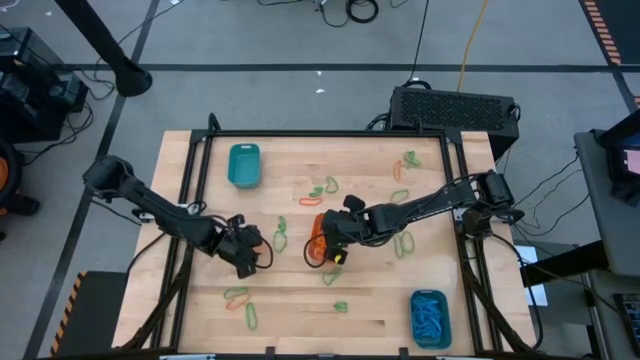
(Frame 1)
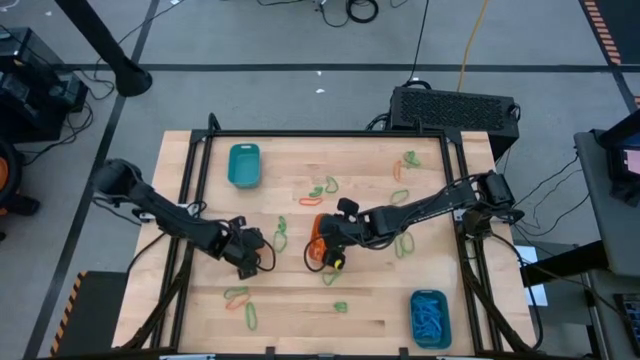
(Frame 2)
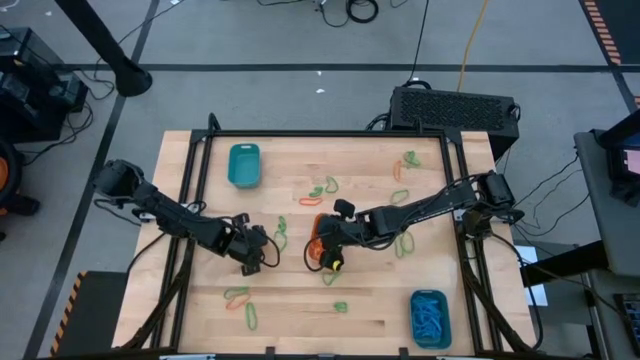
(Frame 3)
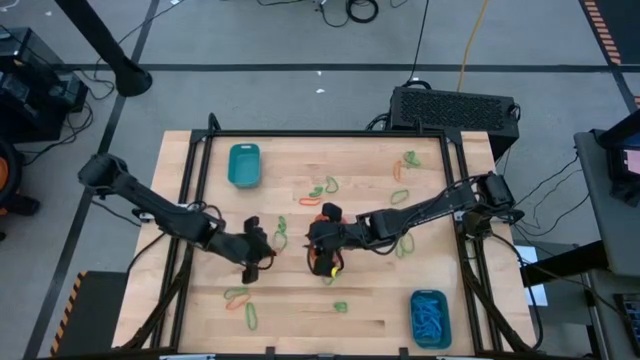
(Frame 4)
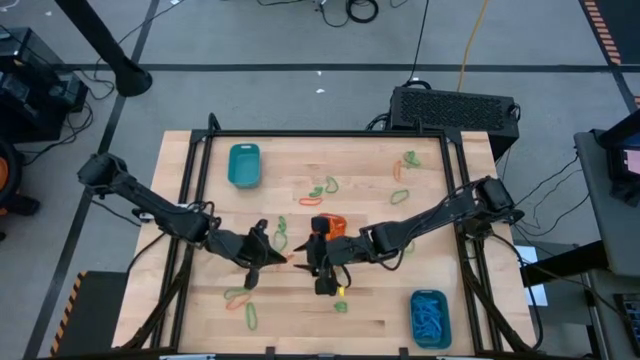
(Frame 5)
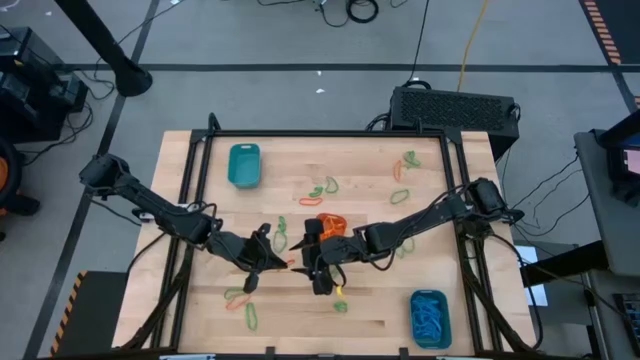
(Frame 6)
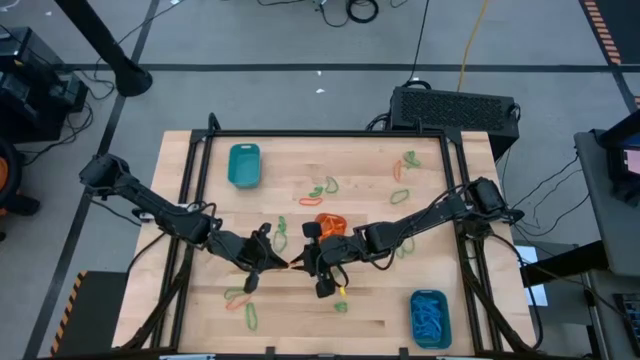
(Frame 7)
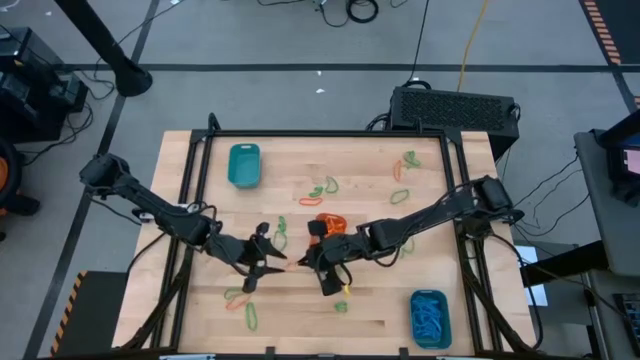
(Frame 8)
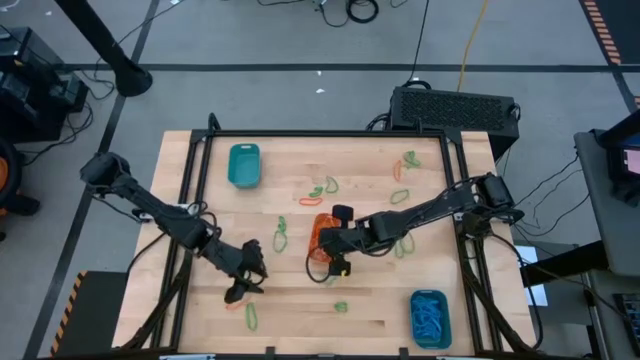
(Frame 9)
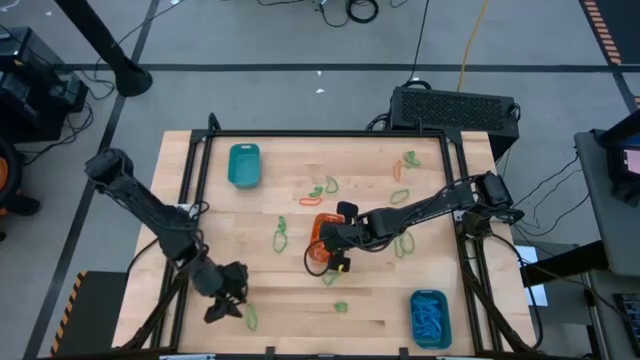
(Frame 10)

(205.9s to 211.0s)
Task: Sort rubber bands into baskets
Put the orange rubber band into the orange bin

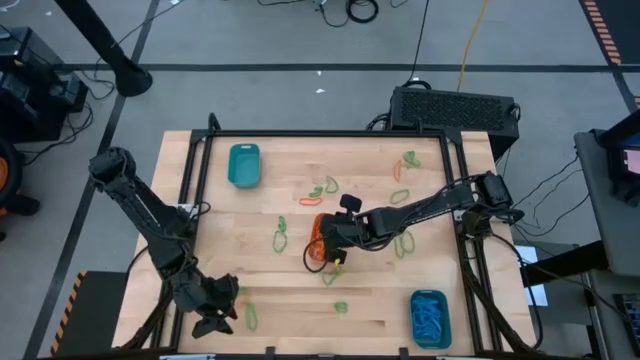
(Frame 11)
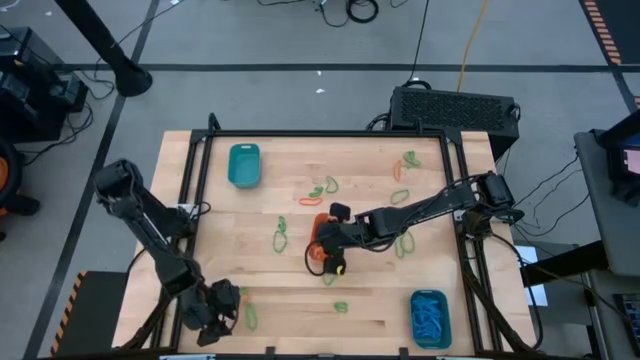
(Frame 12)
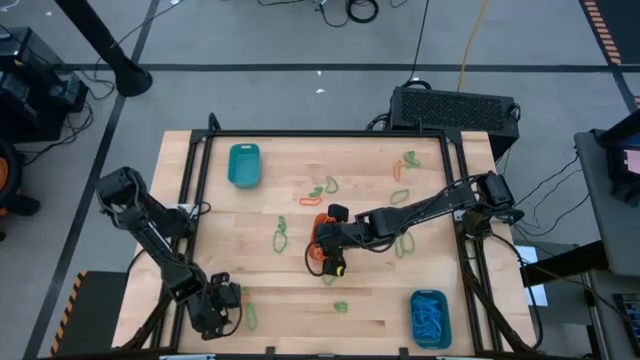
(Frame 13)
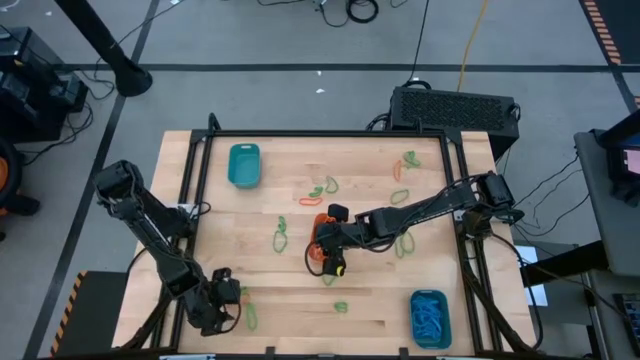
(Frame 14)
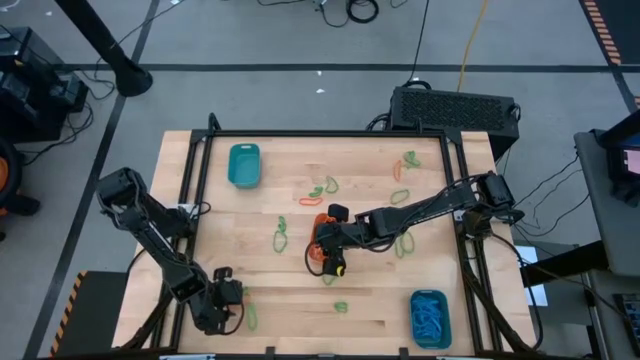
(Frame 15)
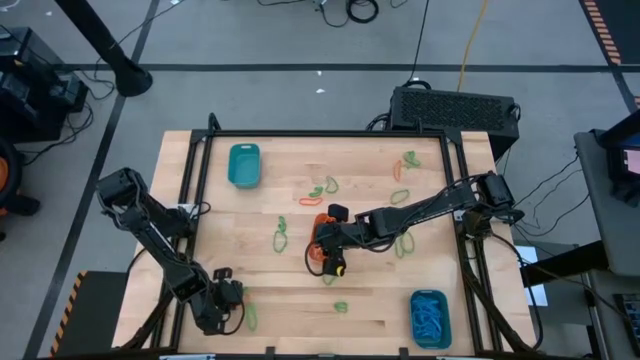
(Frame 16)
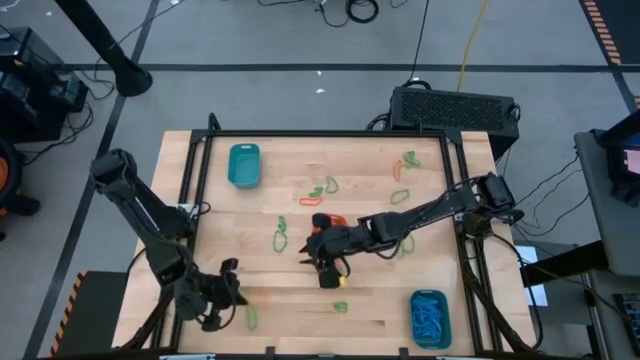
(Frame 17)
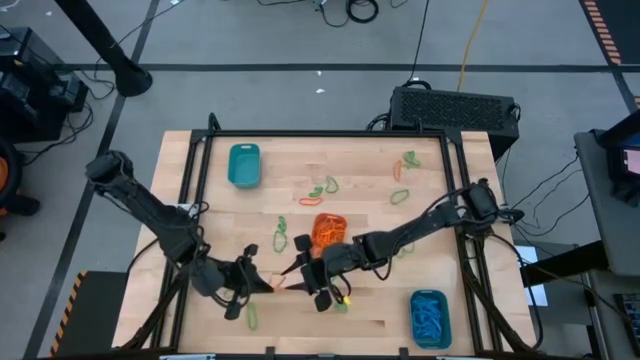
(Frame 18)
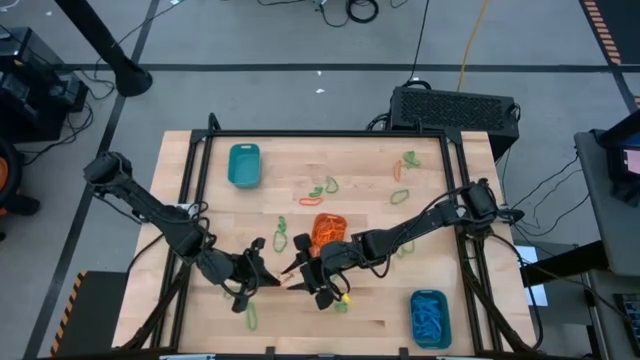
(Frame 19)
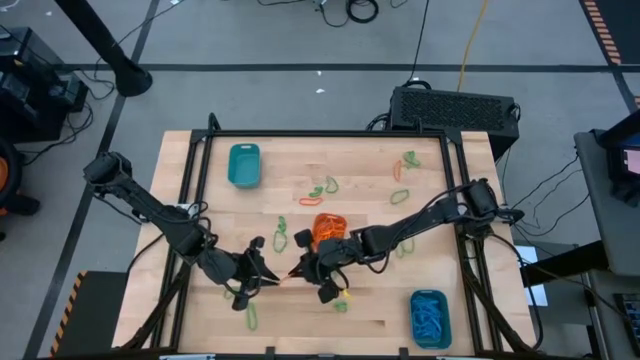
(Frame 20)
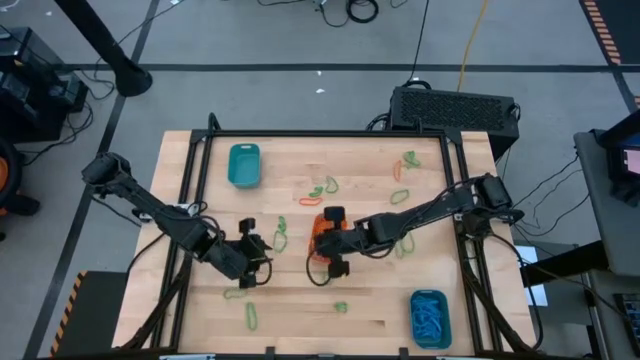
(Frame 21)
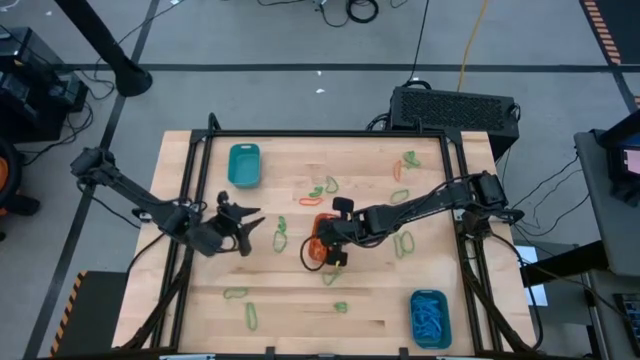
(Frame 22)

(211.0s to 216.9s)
Put the orange rubber band into the orange bin

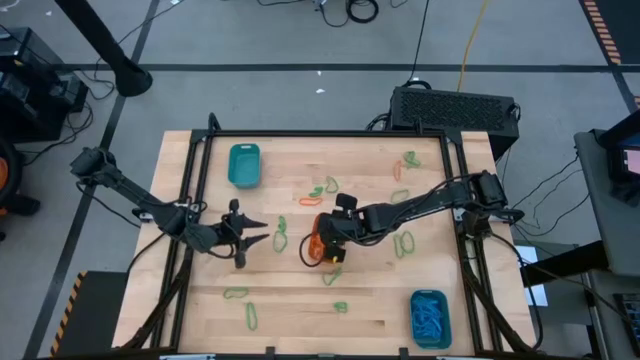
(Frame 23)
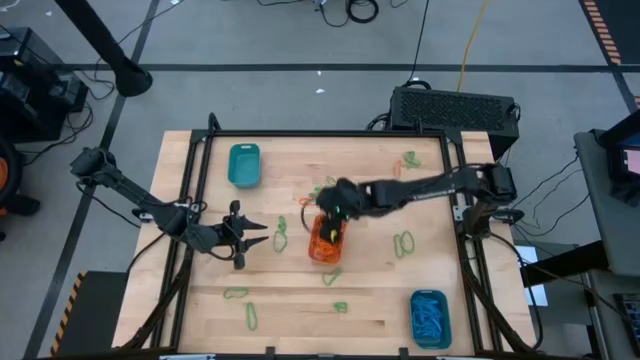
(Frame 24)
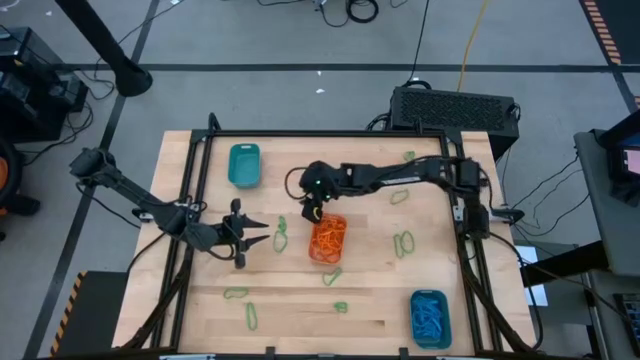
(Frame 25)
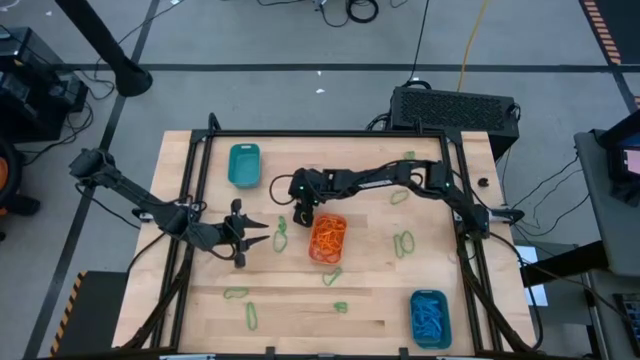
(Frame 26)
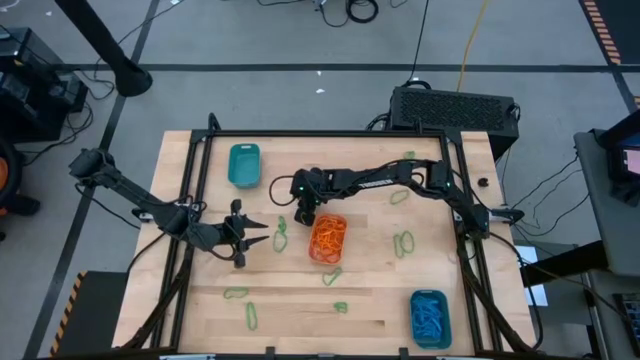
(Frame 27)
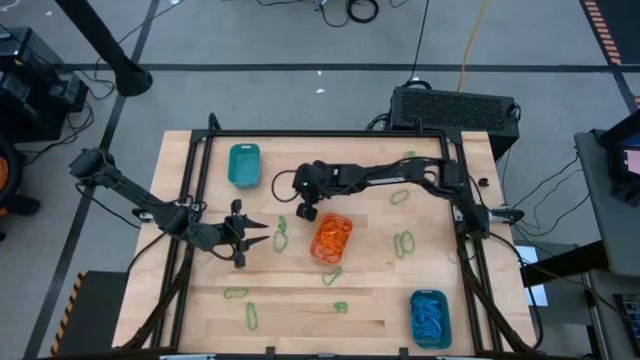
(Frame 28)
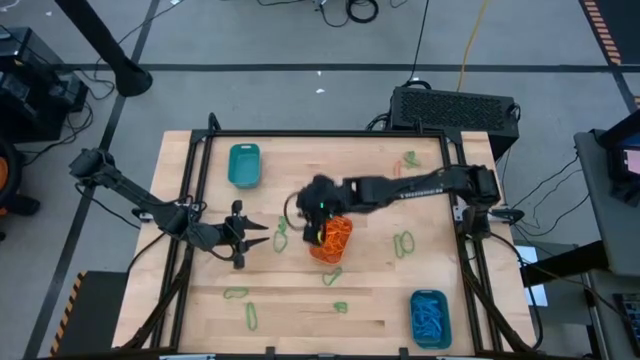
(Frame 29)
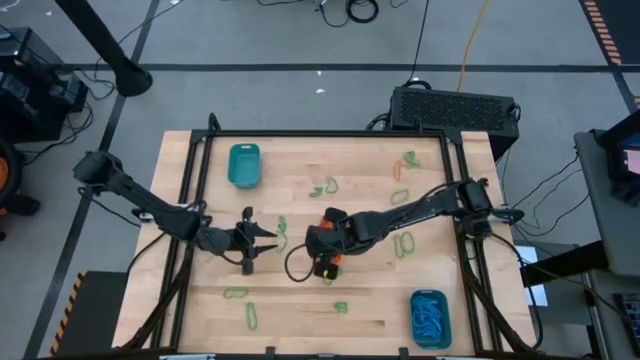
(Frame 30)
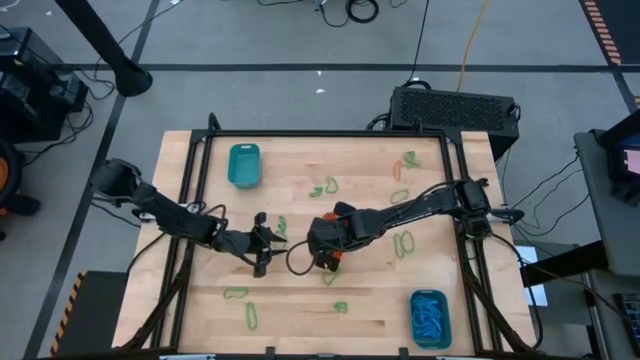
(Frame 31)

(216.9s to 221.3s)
Put the orange rubber band into the orange bin

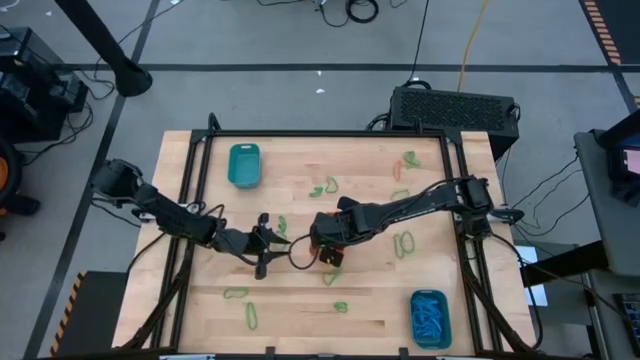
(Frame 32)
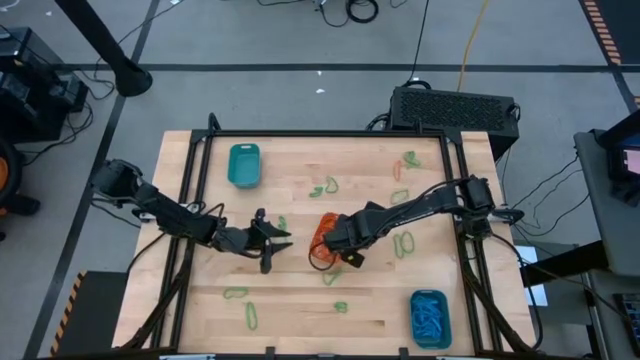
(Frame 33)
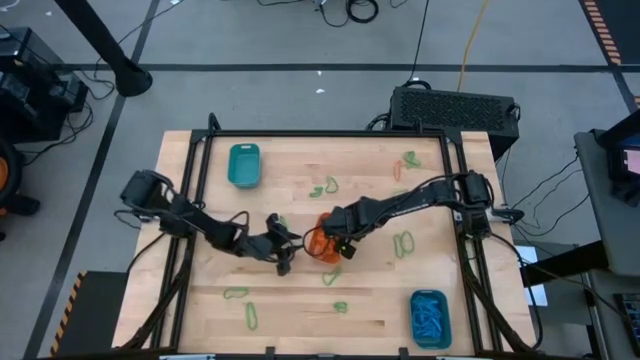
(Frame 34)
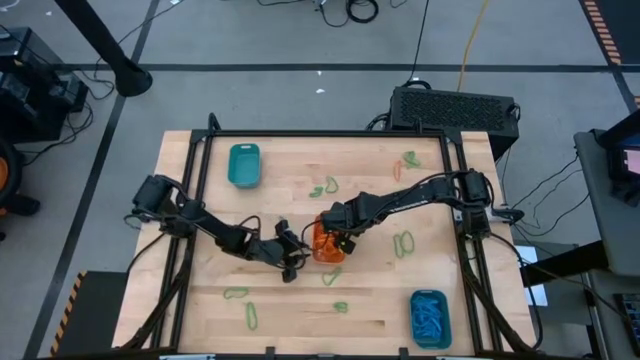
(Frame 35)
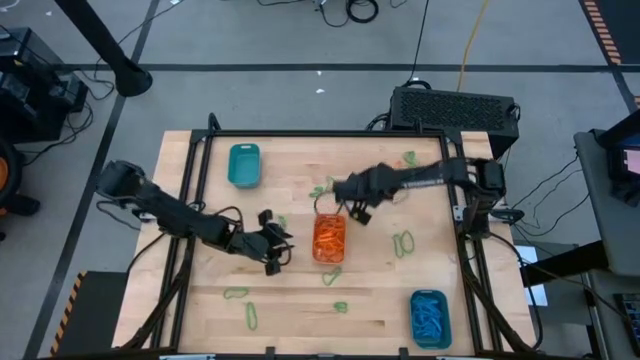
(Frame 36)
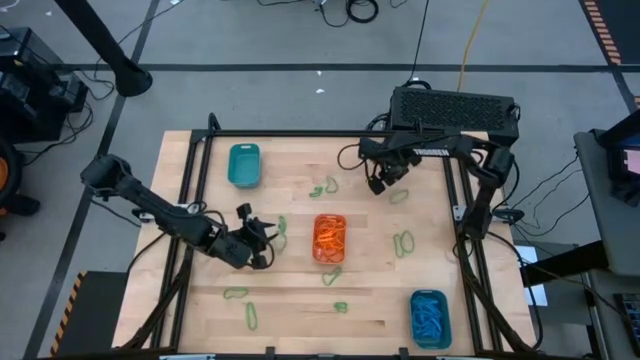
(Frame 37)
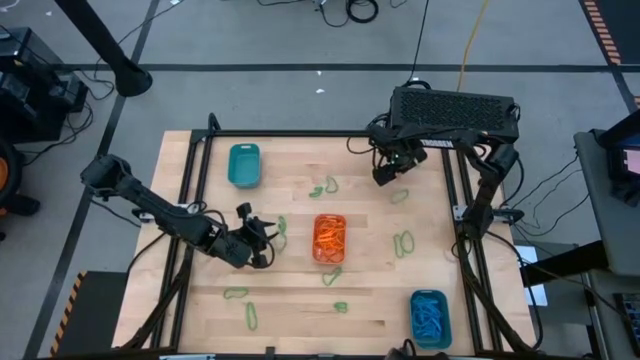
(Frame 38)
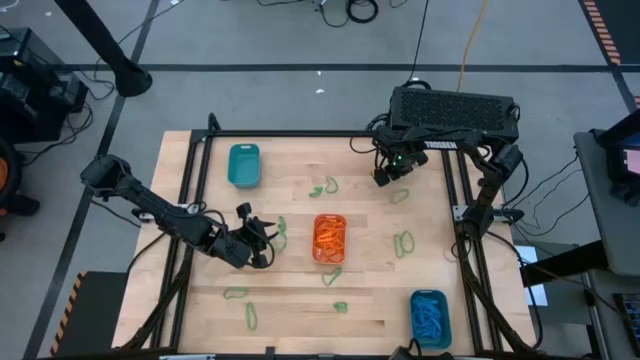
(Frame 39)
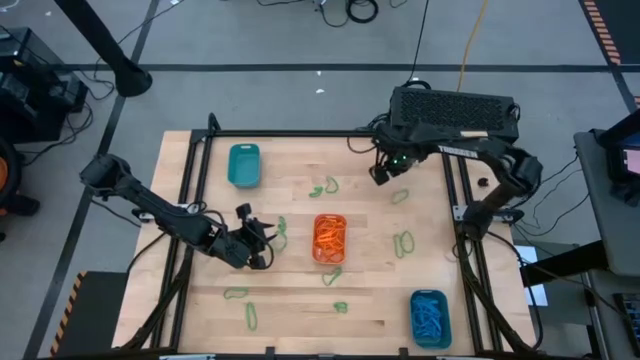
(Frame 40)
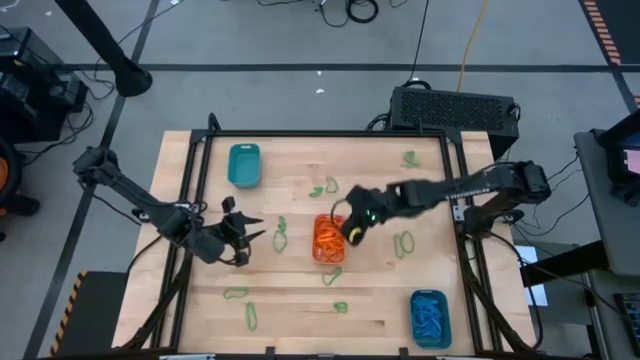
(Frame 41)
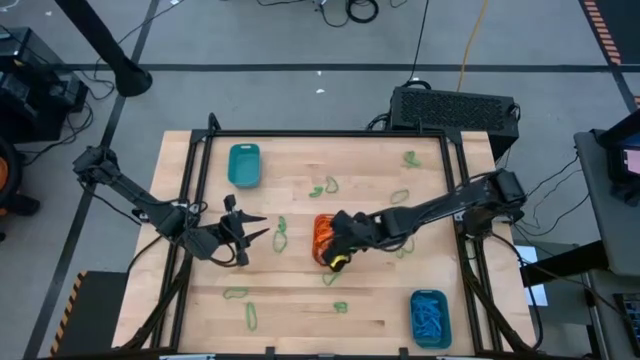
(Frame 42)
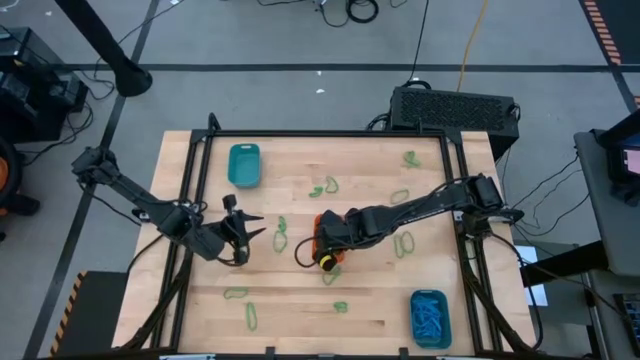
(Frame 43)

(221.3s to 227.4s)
Put the orange rubber band into the orange bin
